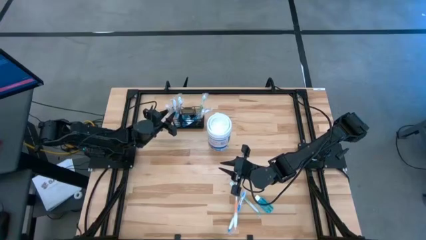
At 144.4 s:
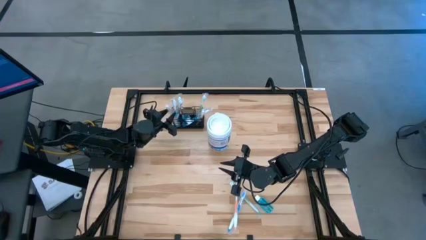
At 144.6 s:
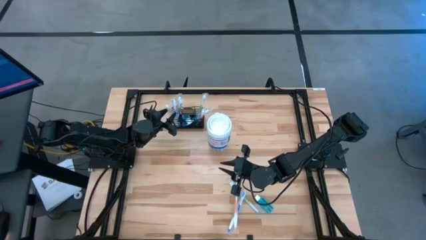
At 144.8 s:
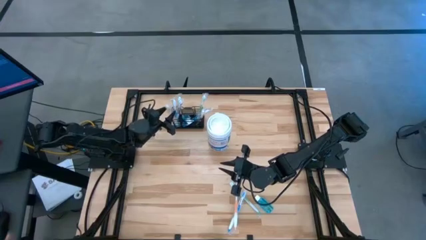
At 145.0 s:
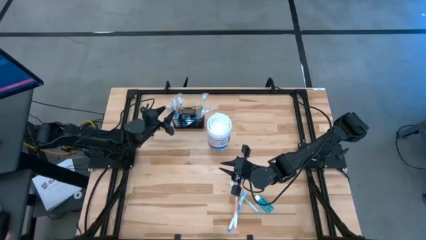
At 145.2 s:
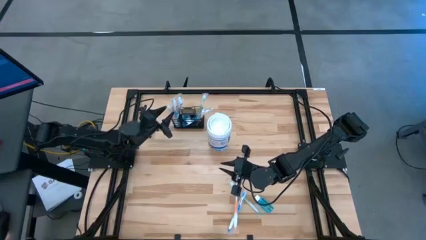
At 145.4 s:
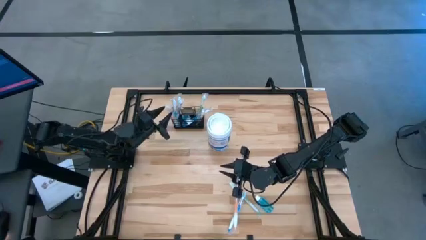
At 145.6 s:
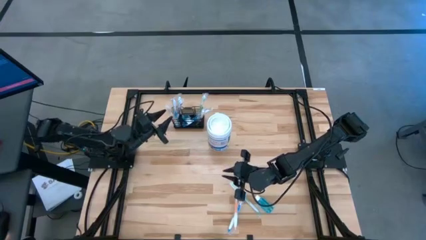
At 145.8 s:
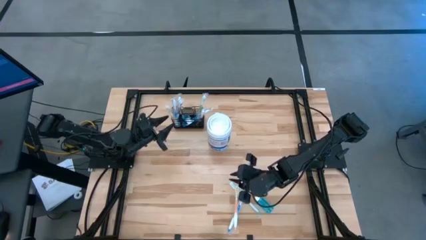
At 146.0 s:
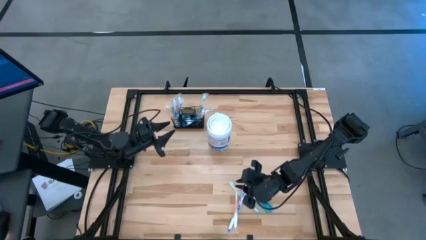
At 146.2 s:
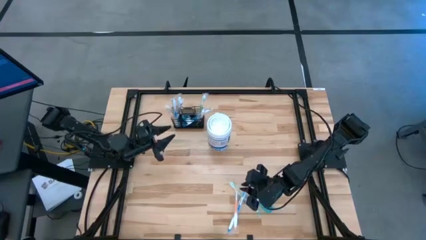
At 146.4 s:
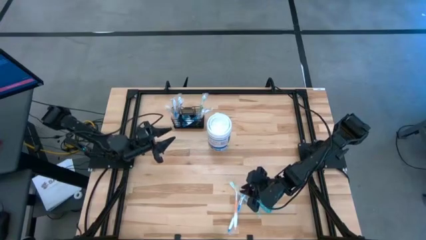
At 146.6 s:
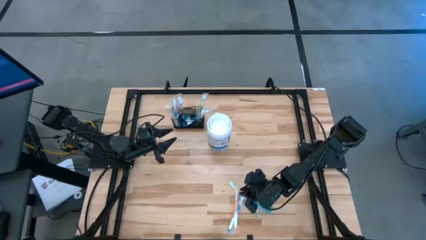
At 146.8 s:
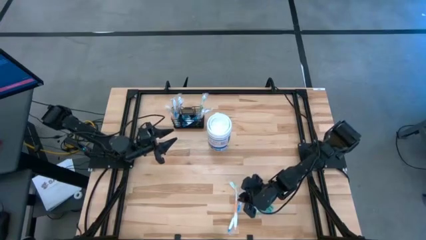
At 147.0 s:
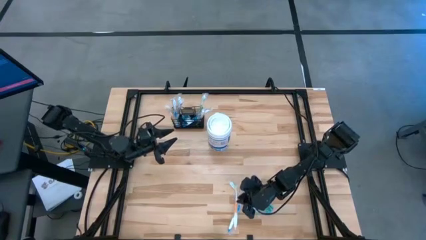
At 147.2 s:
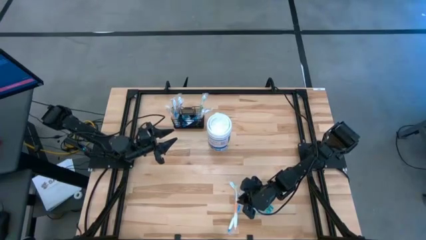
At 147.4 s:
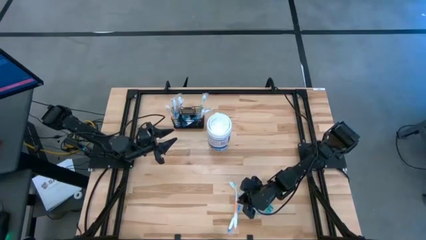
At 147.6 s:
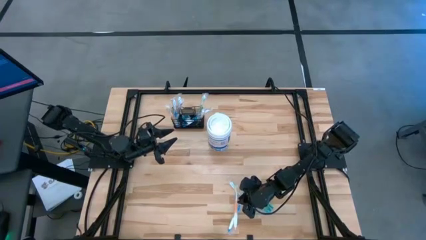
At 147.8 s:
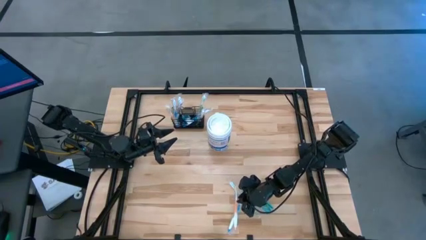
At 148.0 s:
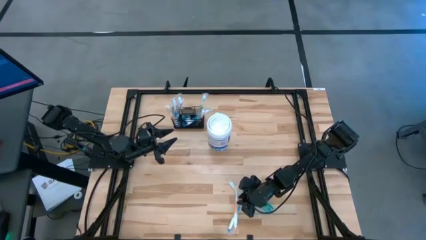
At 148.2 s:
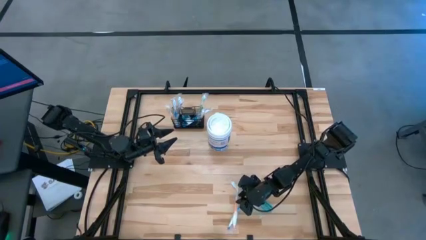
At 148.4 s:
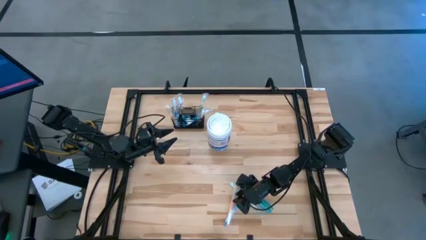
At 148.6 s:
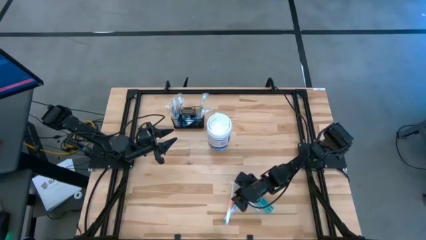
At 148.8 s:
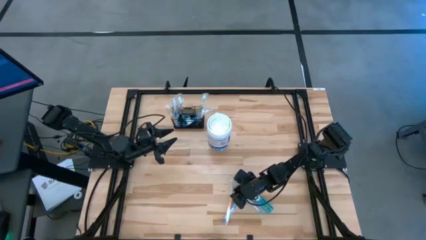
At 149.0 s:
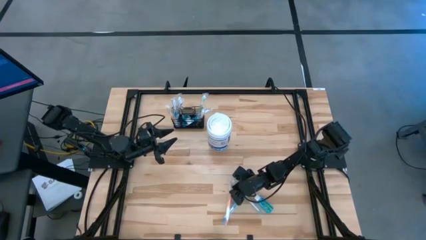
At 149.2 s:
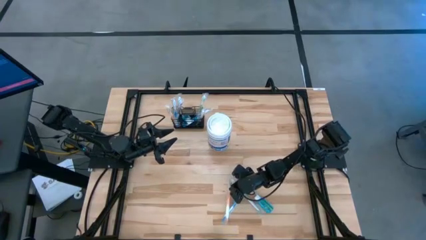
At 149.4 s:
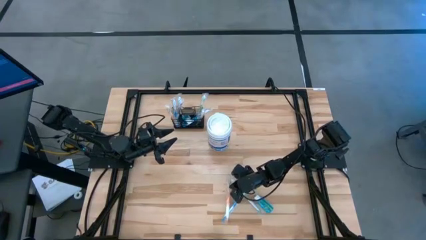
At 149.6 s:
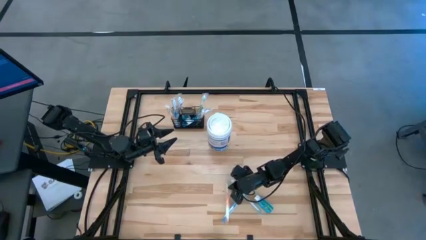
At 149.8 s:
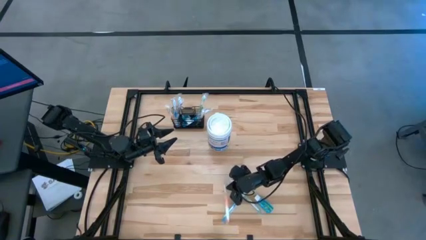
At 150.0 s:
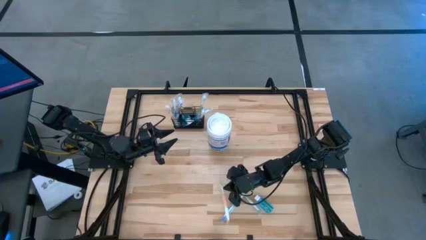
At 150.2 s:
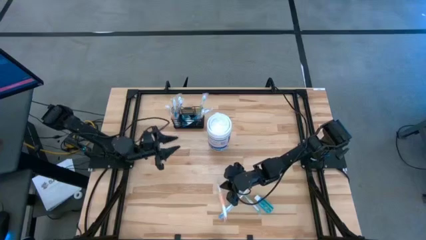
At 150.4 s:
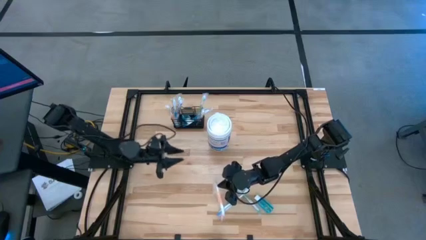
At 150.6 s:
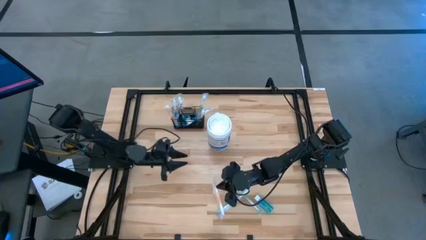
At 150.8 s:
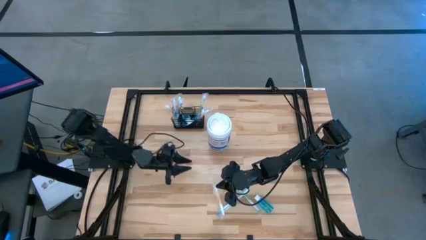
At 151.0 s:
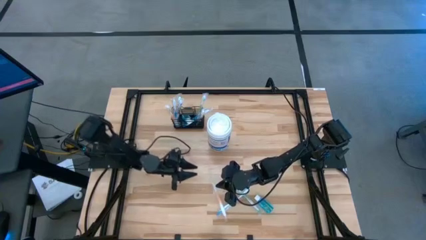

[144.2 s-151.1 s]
Task: Pick & Place toothbrushing station
Put the orange toothbrush into the mesh organizer

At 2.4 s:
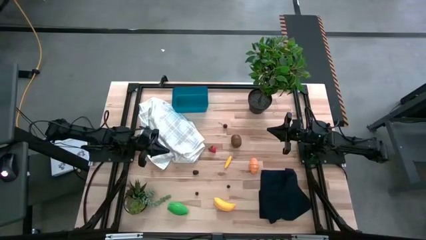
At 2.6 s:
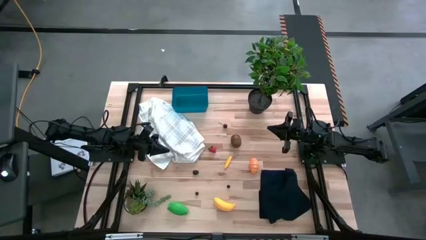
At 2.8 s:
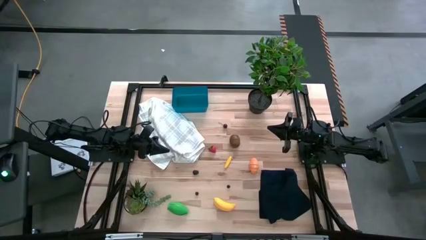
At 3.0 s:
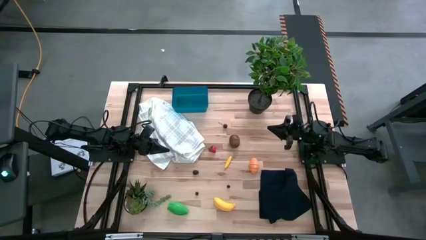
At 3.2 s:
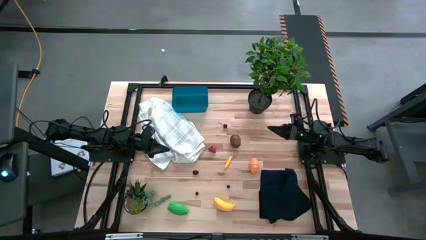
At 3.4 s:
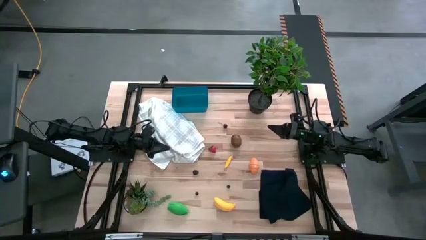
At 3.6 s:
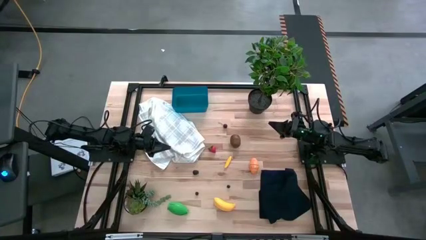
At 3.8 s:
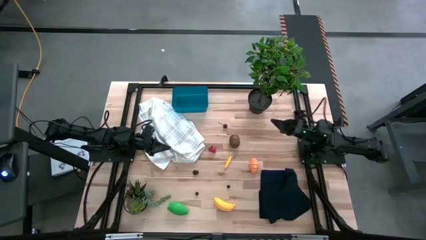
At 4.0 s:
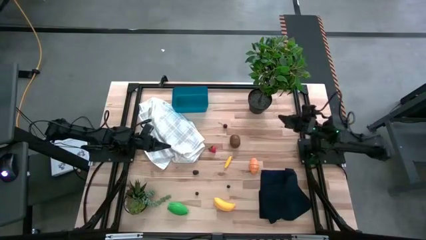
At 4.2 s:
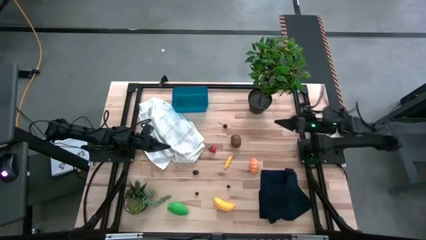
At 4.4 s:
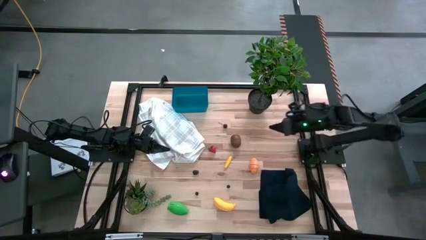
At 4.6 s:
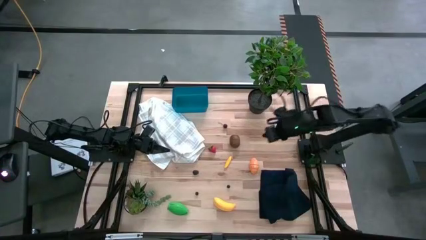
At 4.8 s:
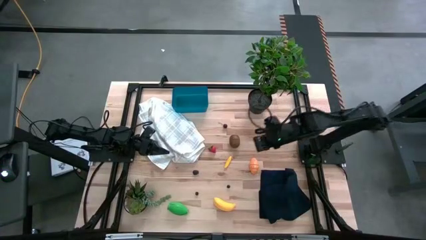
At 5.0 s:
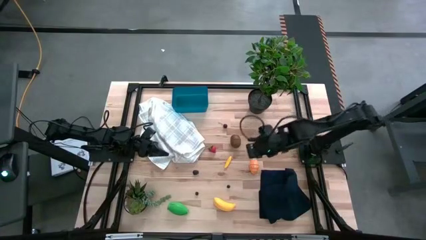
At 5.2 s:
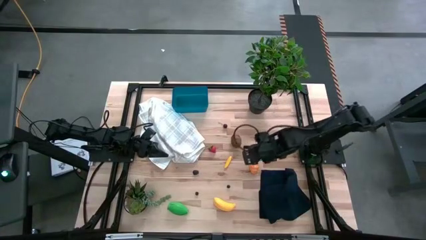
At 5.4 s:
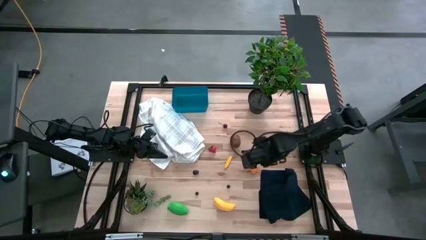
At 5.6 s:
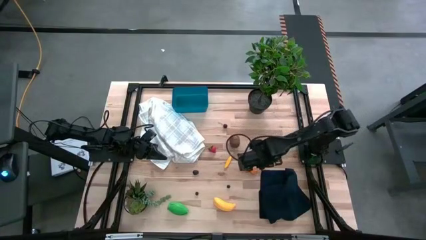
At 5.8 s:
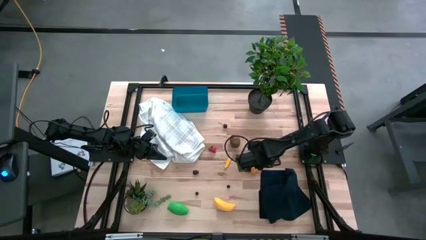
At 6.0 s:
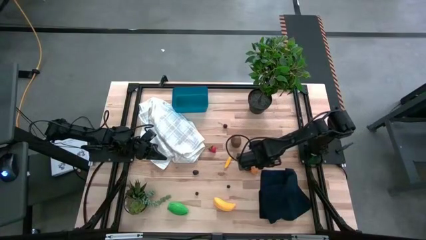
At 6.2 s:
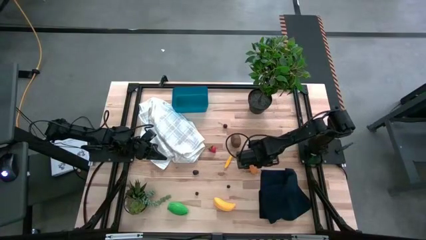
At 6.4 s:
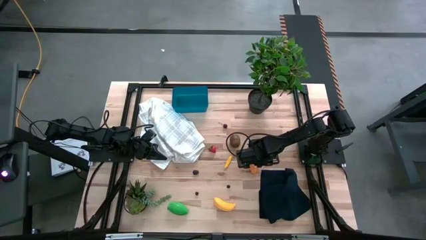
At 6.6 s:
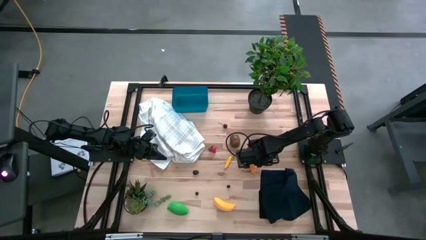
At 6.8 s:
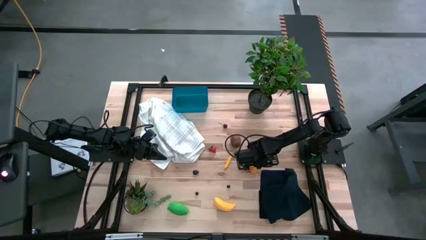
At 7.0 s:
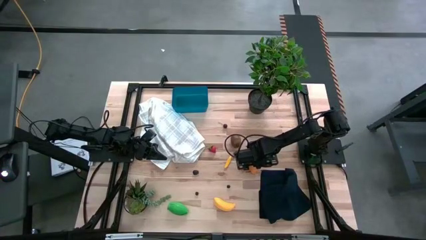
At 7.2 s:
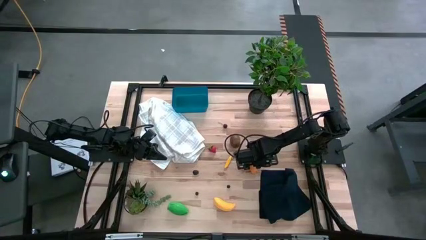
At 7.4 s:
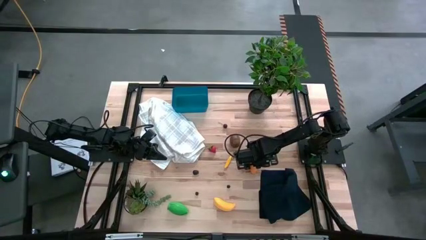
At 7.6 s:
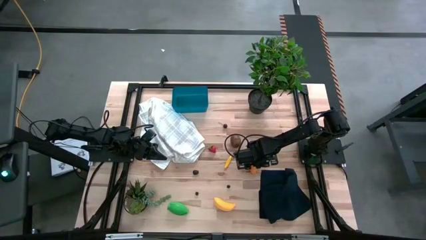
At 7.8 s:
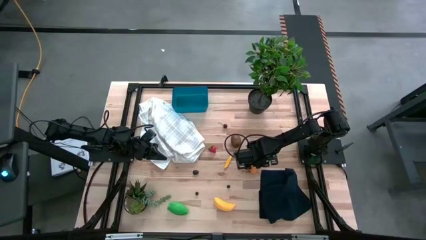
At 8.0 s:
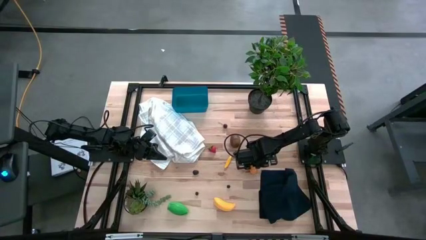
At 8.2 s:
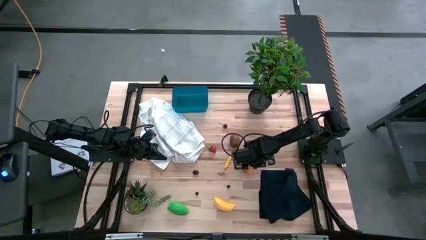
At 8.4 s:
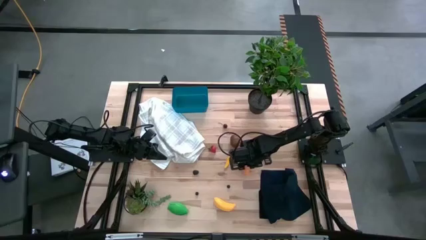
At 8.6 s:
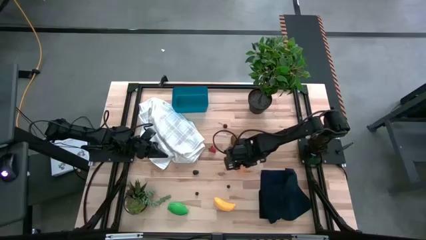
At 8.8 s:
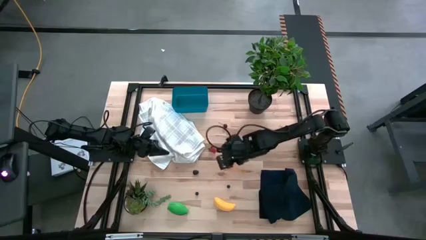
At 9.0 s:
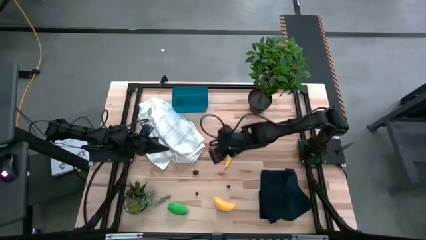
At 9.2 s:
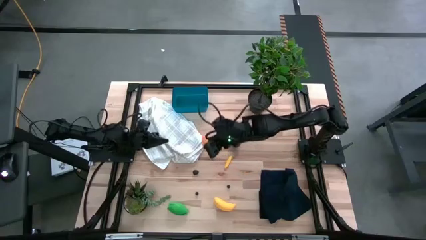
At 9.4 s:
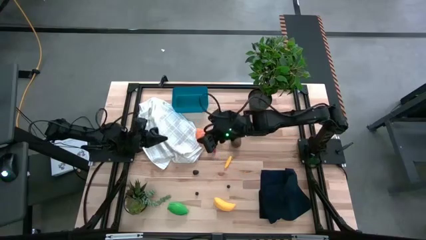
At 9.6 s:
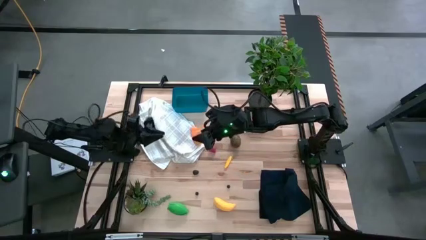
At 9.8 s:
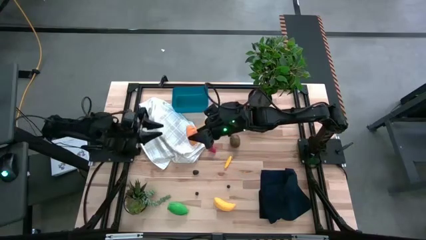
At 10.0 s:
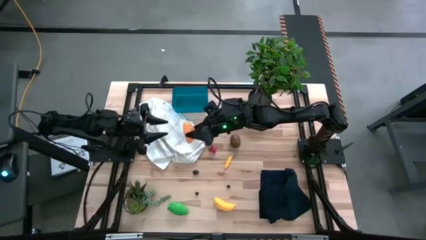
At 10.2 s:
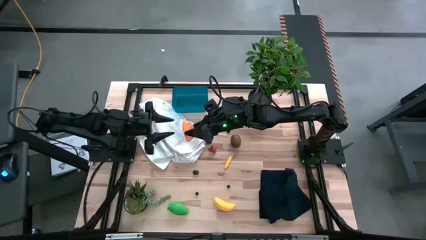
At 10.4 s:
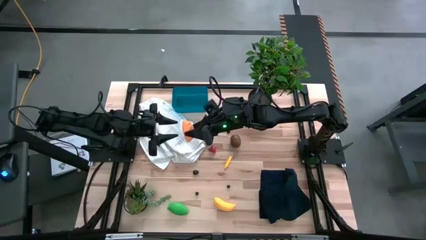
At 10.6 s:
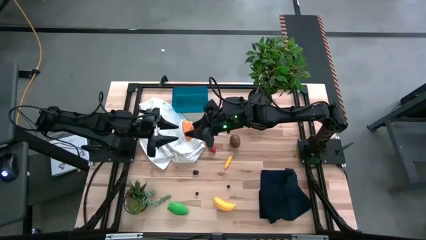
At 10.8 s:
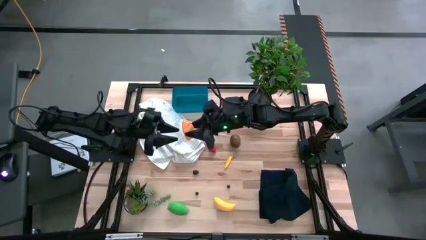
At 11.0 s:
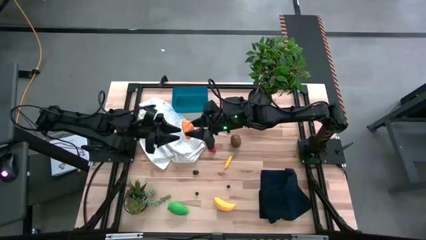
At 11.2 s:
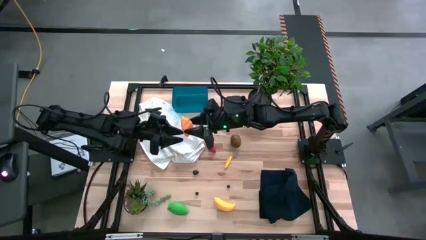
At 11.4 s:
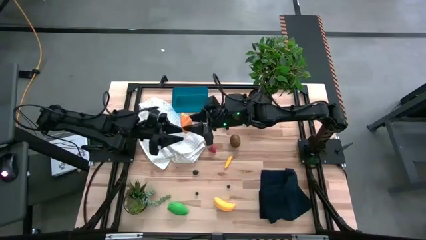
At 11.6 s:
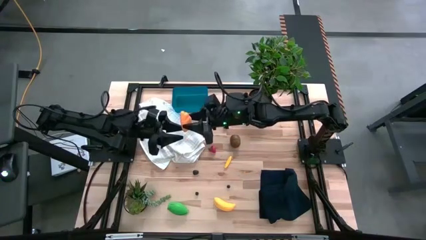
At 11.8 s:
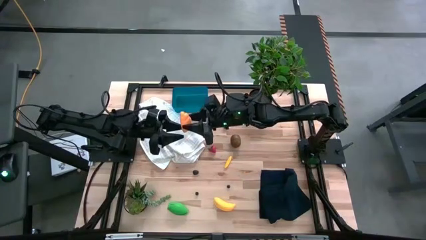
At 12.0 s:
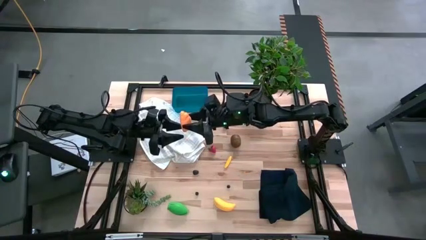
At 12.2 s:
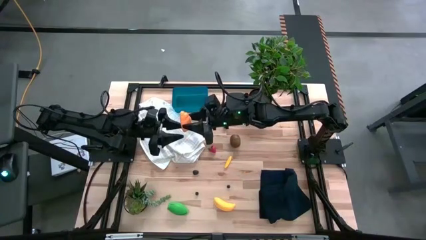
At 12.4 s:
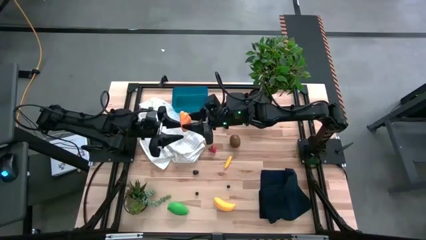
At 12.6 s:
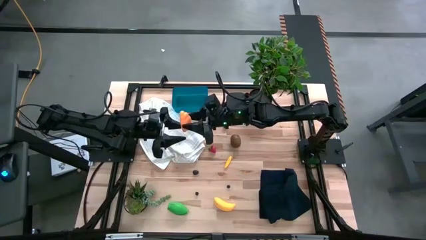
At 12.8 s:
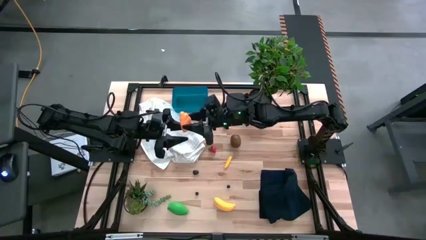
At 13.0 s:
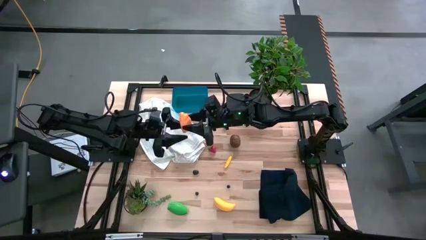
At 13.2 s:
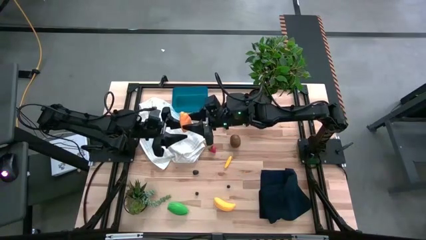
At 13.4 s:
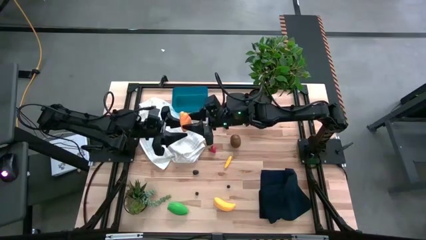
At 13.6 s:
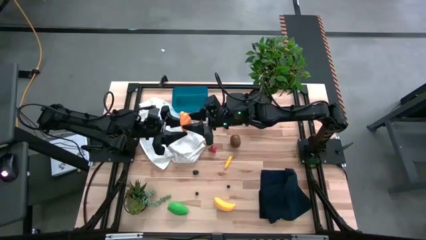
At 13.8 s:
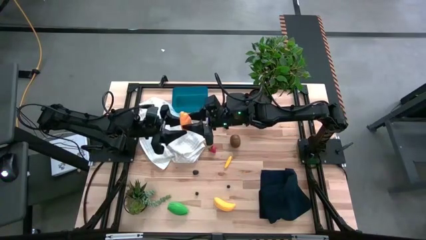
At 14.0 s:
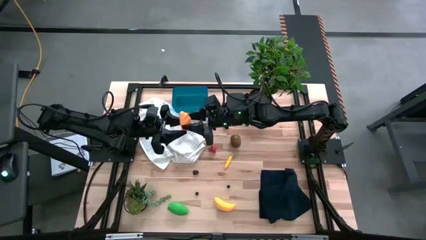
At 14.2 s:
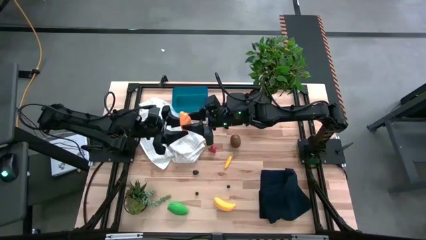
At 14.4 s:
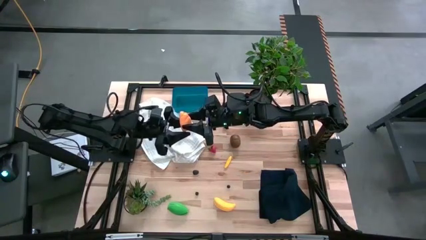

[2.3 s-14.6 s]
Task: Pick and placing Produce into tupperware
Put the yellow croissant into the blue bin
